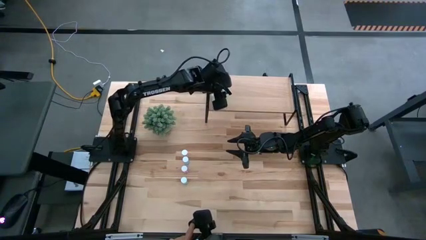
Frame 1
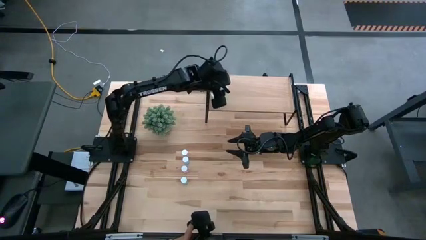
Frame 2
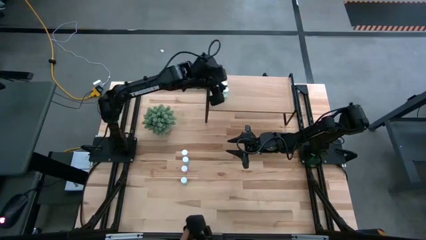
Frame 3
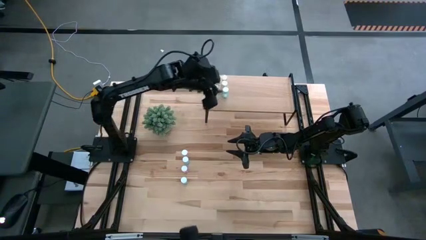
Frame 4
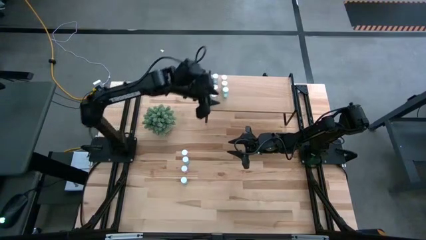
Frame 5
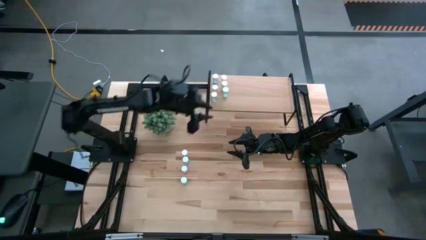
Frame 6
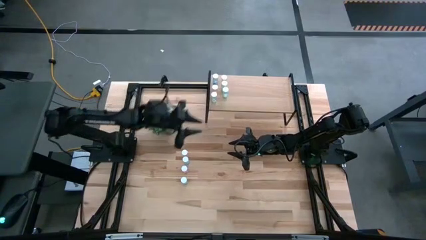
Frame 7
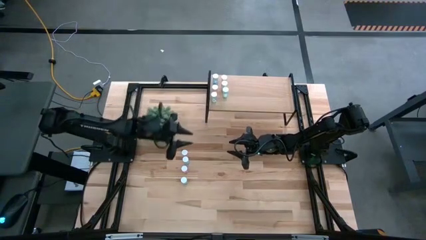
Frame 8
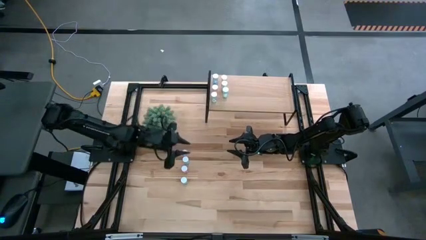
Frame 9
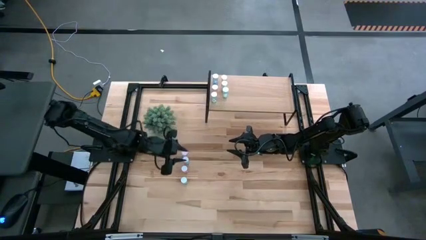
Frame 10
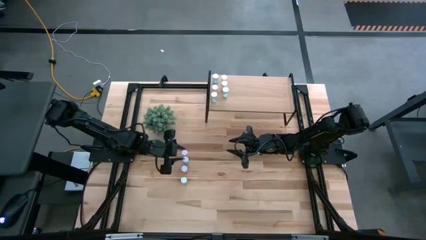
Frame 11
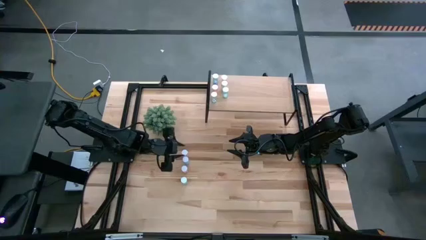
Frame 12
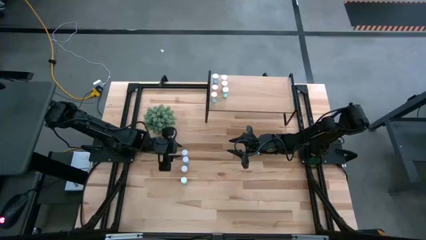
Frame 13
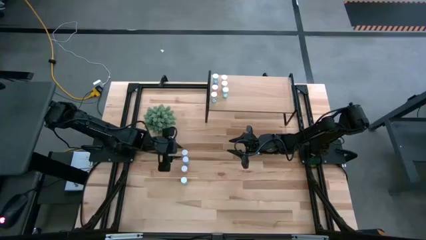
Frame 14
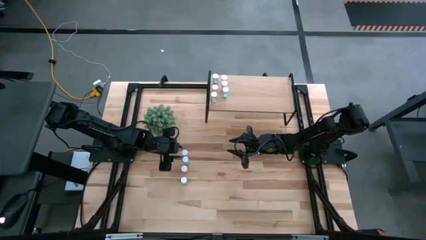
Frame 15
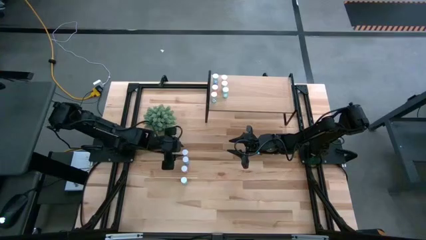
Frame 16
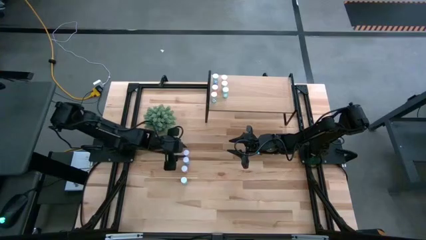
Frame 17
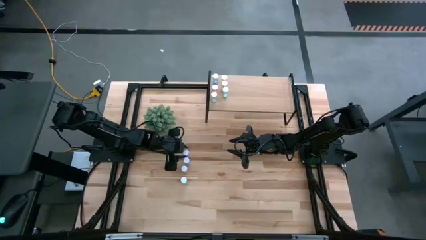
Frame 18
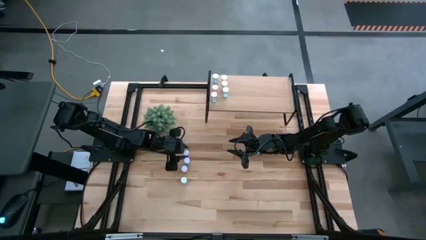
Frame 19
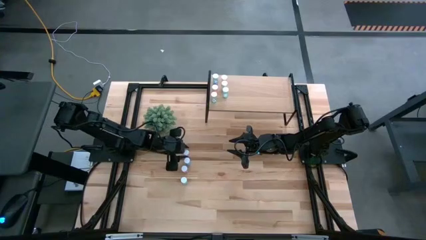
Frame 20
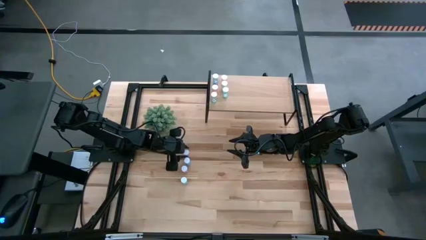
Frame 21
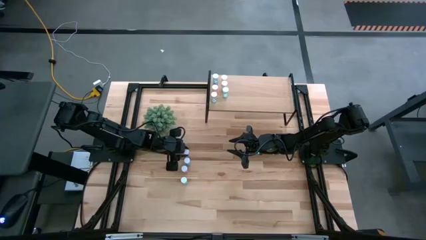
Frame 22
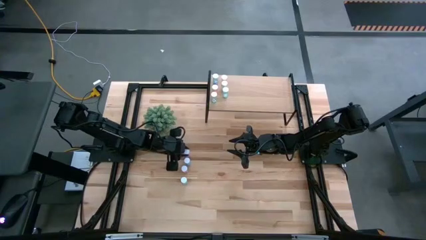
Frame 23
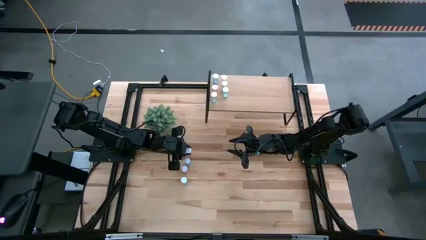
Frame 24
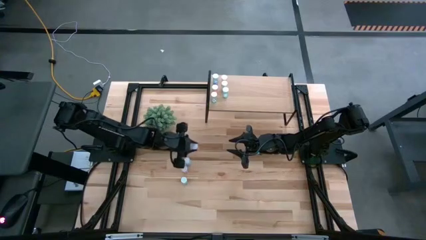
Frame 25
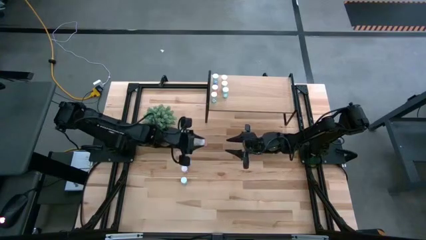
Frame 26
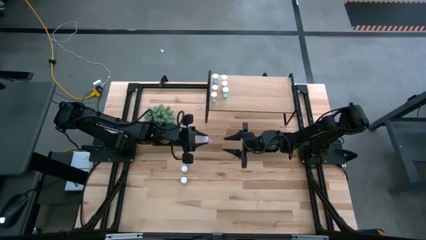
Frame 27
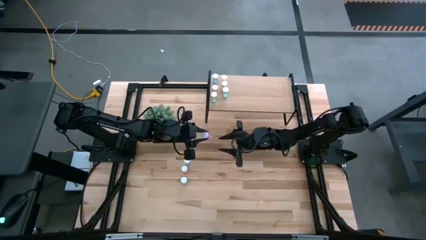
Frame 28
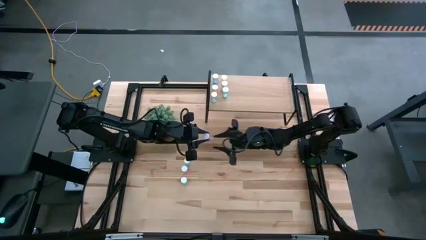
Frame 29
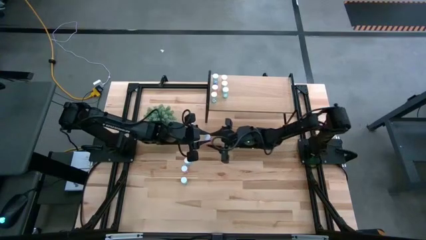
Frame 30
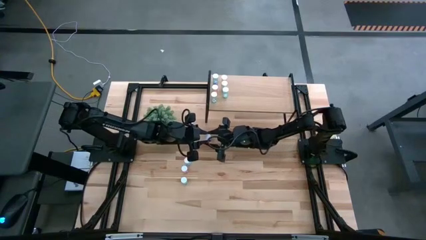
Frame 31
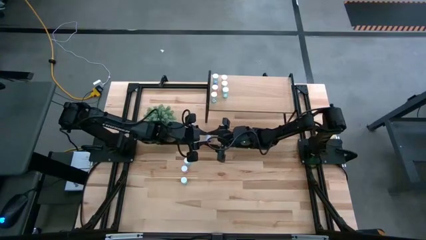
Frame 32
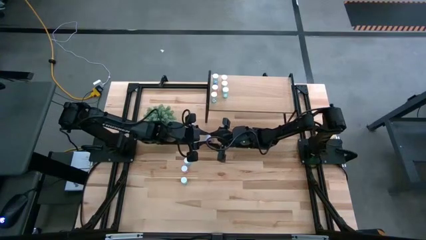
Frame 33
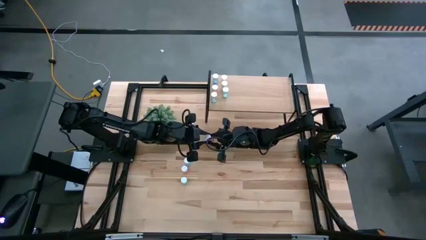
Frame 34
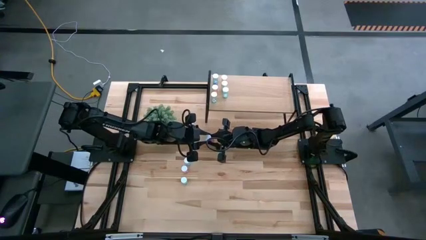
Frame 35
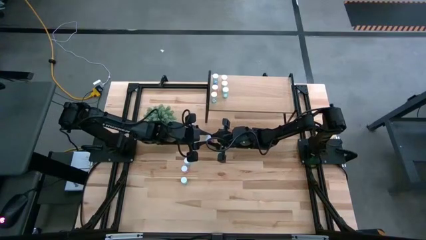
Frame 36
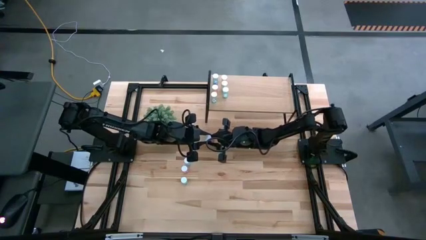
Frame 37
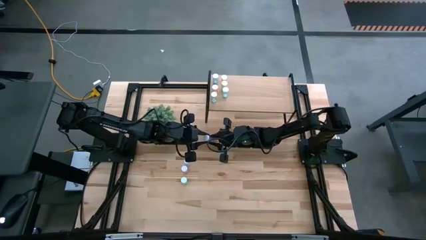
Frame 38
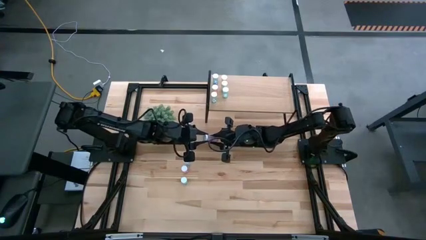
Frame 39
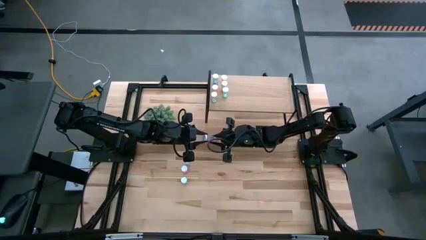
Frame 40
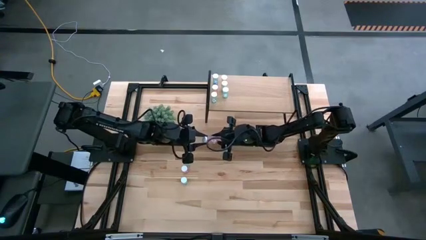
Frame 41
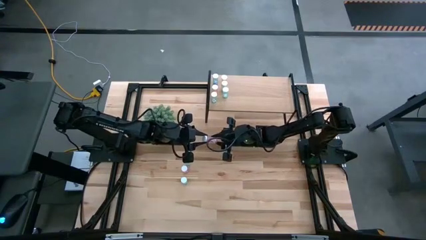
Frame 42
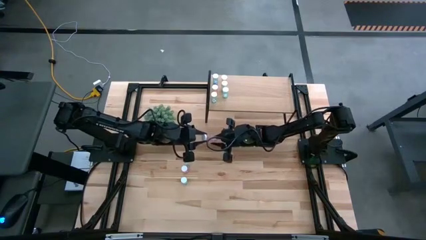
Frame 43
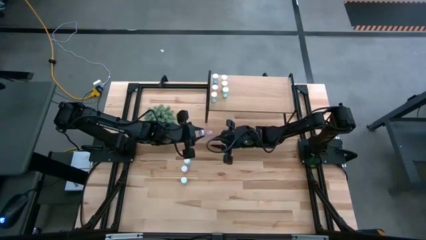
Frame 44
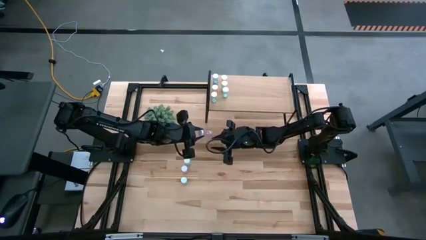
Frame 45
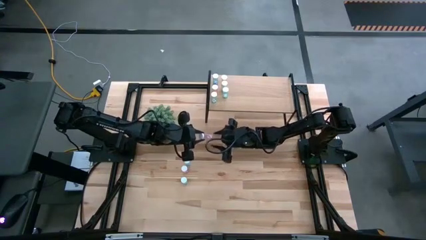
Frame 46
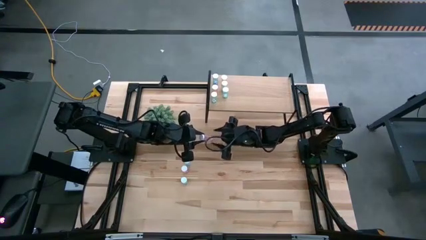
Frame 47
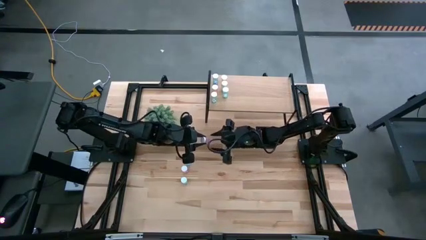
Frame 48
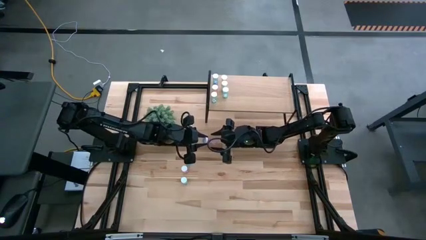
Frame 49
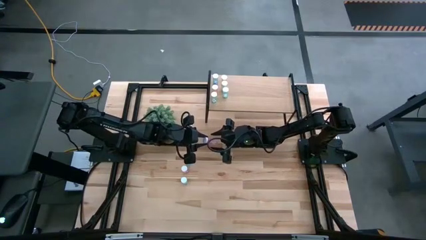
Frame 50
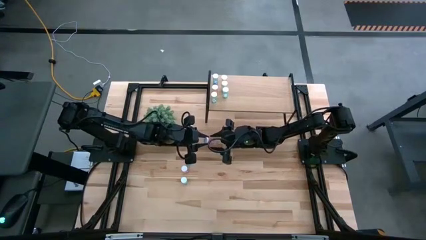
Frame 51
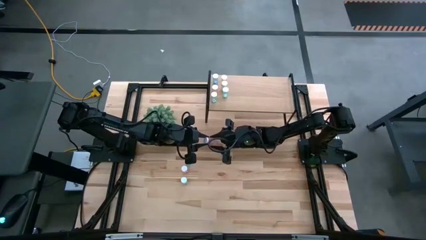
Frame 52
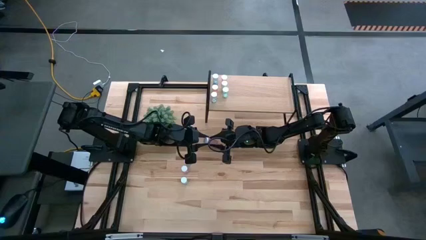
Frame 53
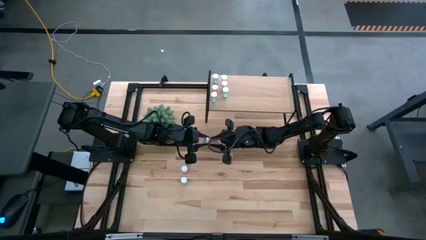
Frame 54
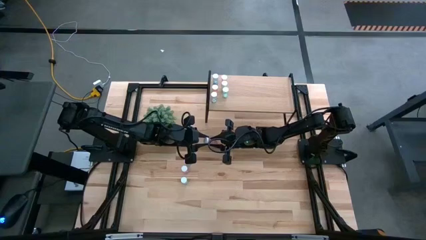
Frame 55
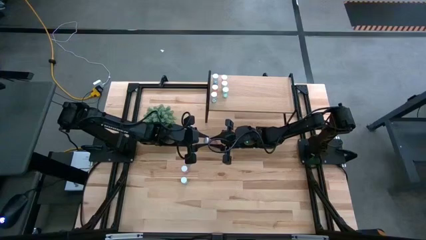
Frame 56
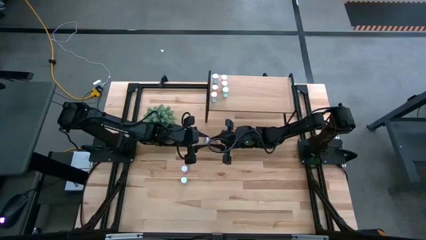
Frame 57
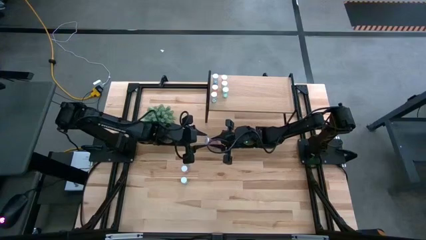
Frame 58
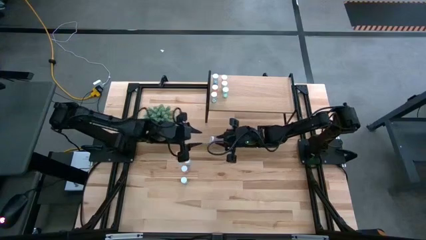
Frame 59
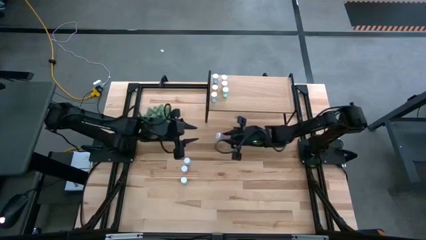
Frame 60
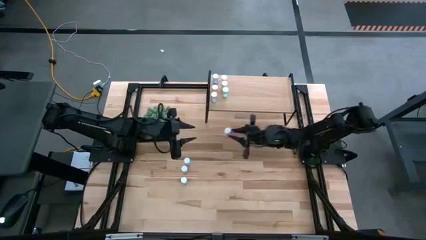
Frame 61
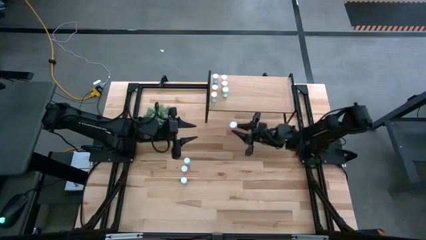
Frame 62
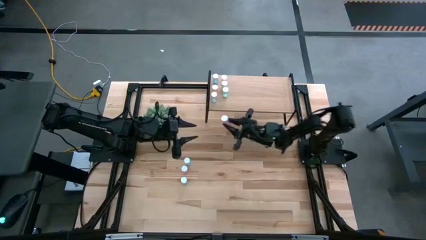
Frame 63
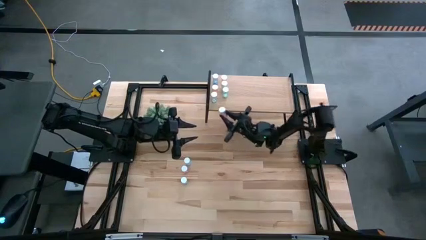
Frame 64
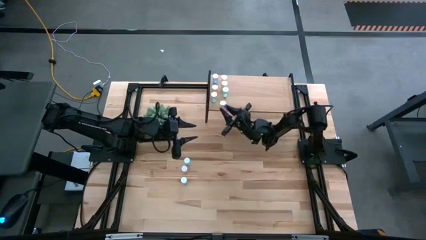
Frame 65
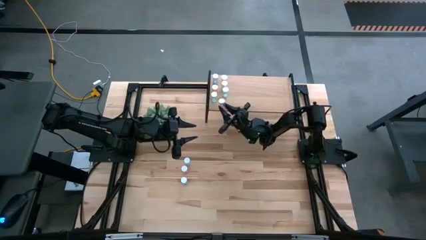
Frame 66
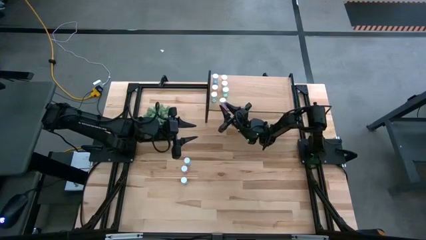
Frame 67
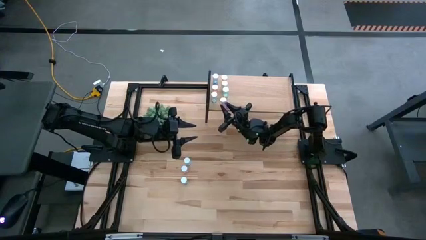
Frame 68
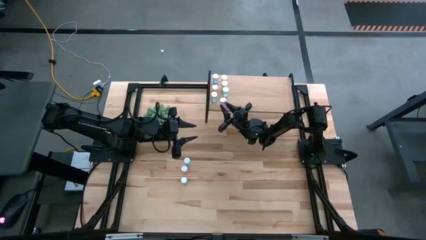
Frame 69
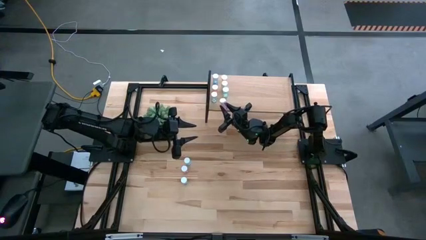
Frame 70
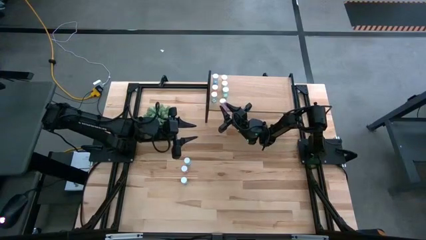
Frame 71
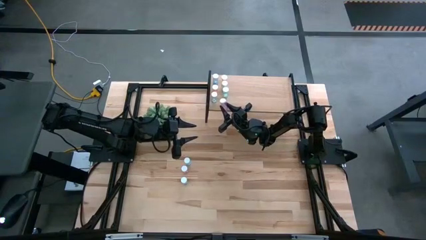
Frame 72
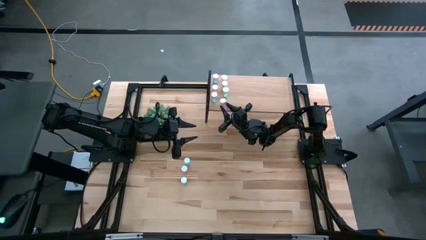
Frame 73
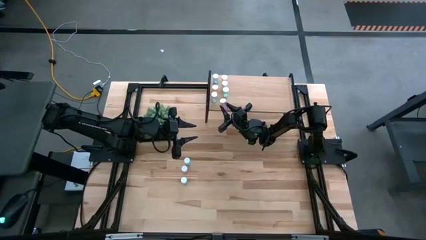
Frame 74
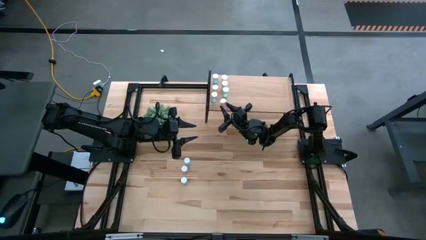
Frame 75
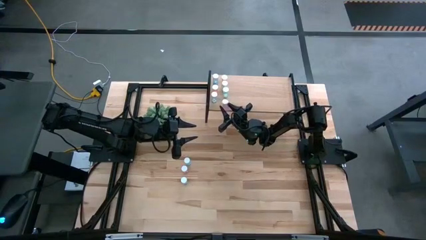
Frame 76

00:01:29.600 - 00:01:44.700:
Task: Pick and place medicine bottles onto shelf by color
Put the transparent pink medicine bottle on the shelf
